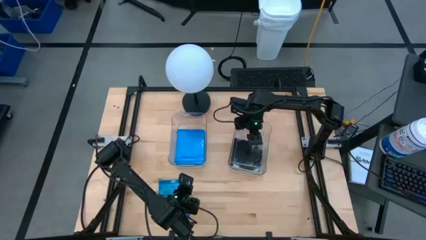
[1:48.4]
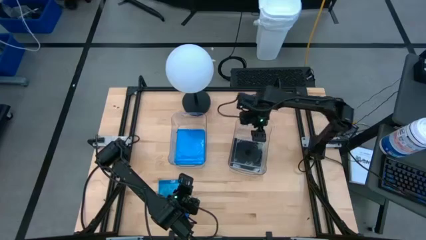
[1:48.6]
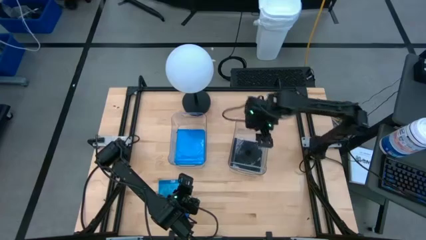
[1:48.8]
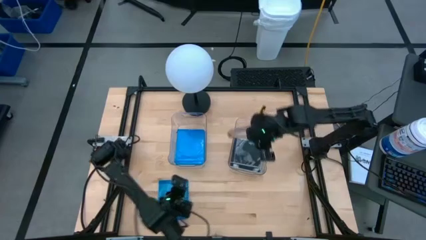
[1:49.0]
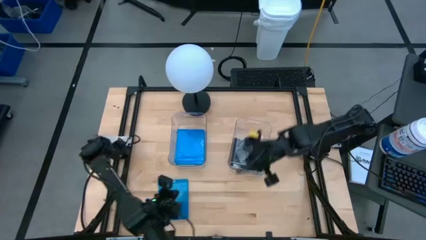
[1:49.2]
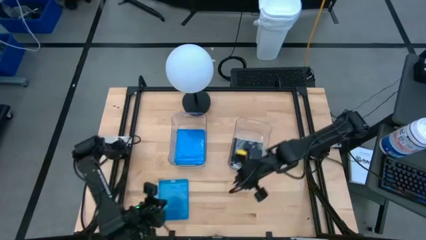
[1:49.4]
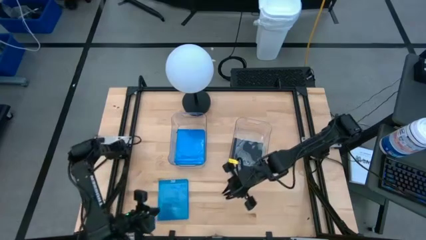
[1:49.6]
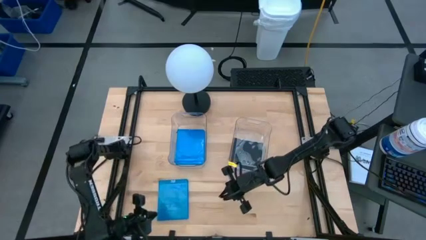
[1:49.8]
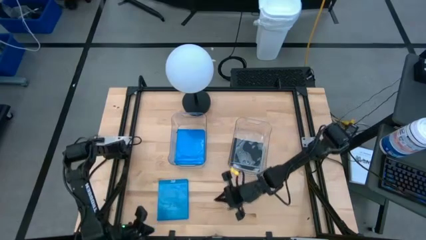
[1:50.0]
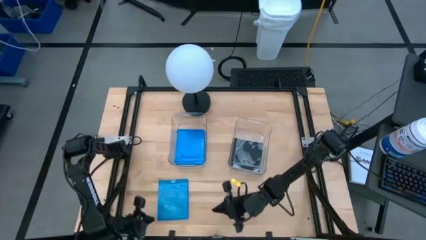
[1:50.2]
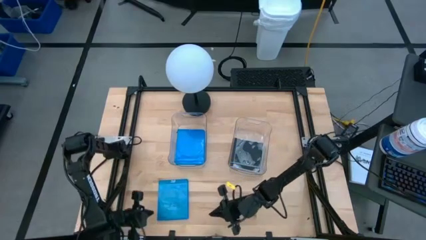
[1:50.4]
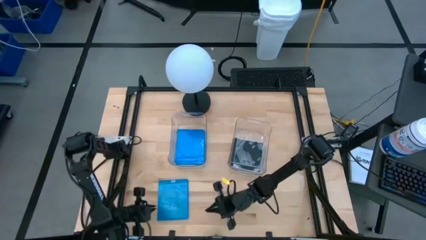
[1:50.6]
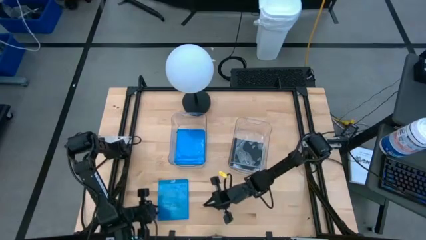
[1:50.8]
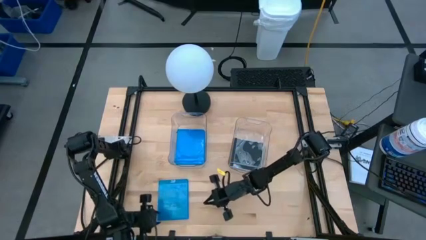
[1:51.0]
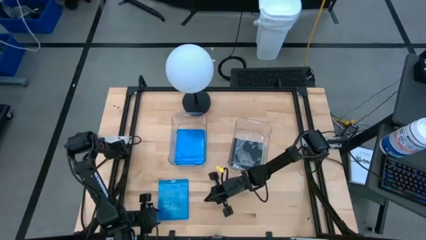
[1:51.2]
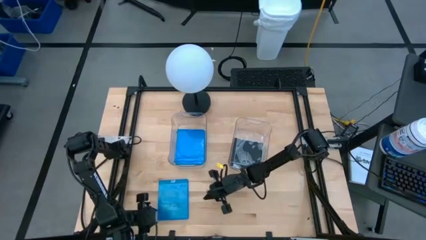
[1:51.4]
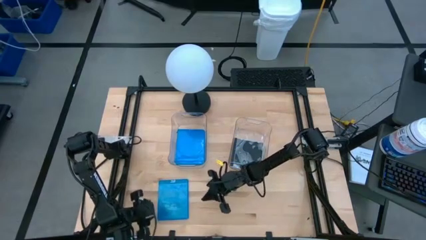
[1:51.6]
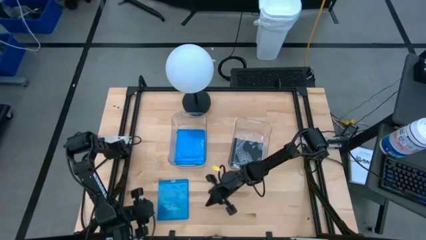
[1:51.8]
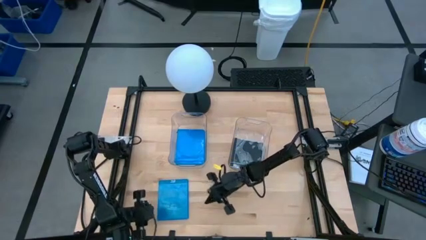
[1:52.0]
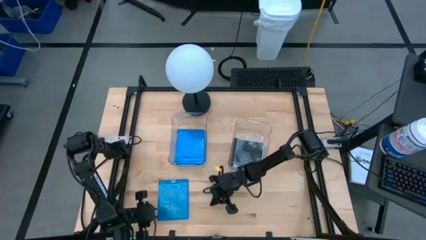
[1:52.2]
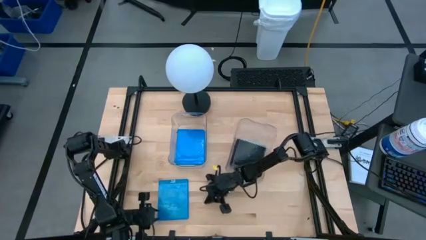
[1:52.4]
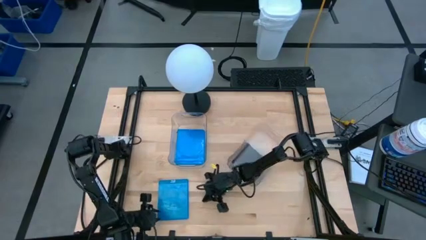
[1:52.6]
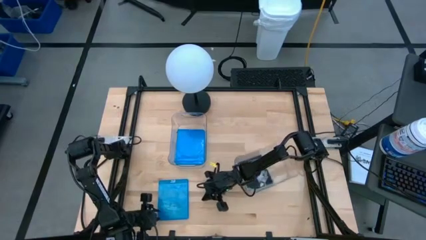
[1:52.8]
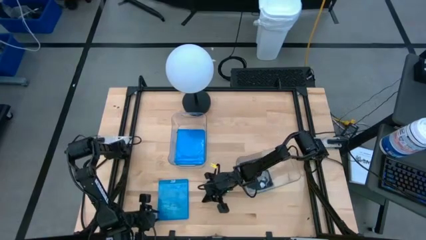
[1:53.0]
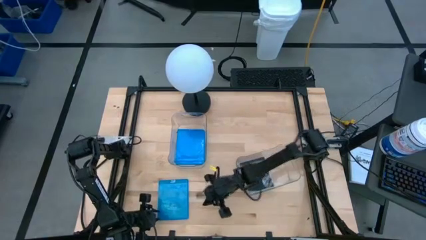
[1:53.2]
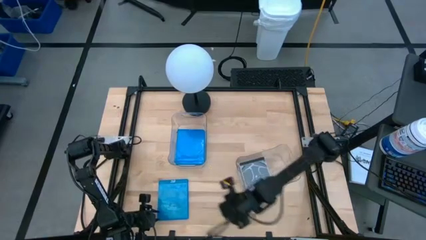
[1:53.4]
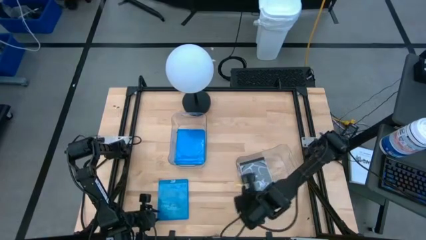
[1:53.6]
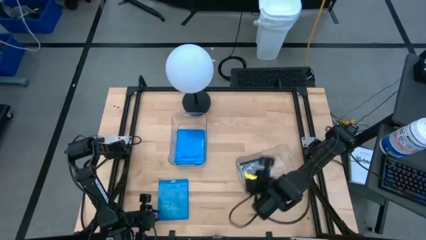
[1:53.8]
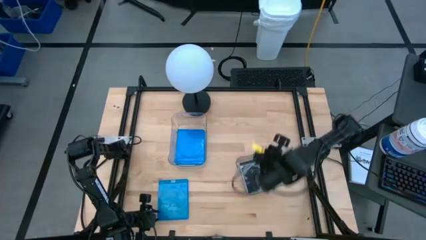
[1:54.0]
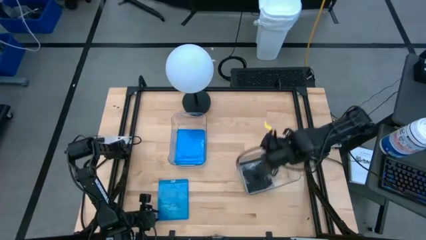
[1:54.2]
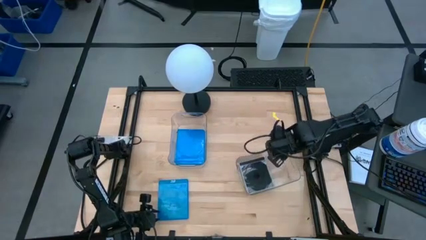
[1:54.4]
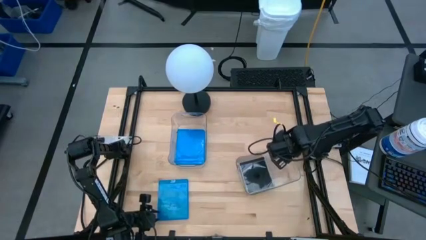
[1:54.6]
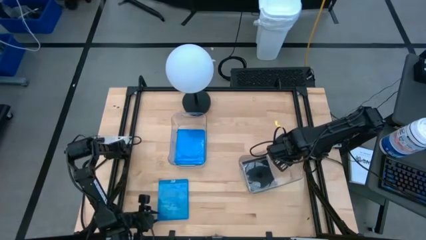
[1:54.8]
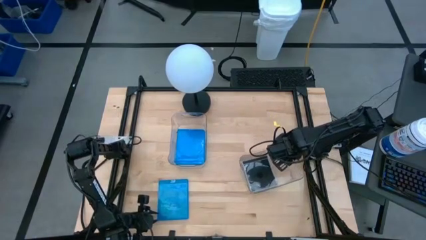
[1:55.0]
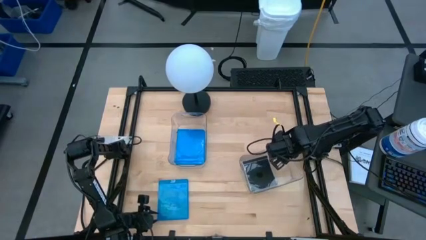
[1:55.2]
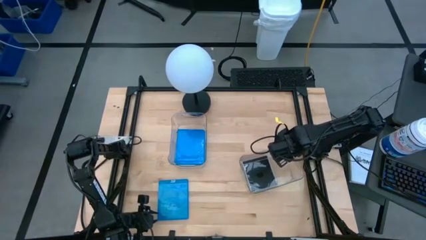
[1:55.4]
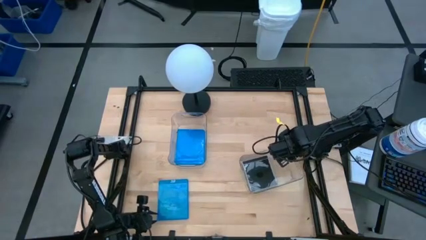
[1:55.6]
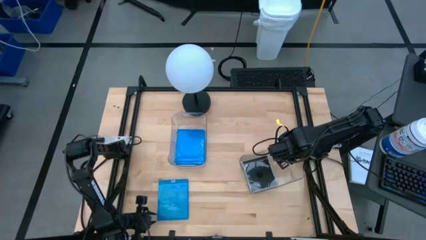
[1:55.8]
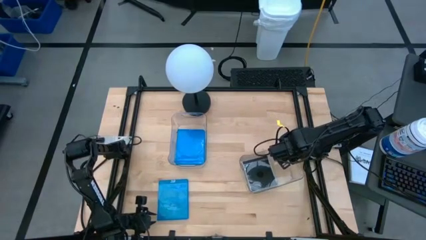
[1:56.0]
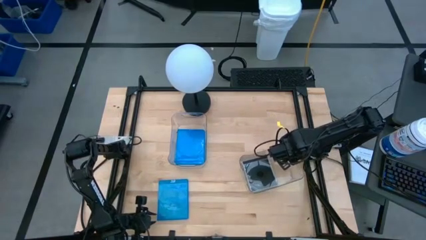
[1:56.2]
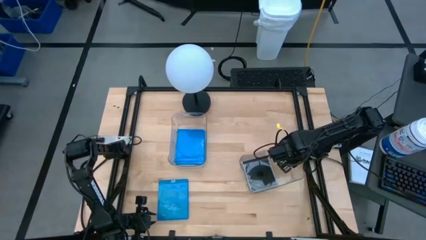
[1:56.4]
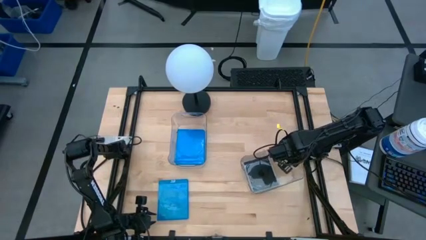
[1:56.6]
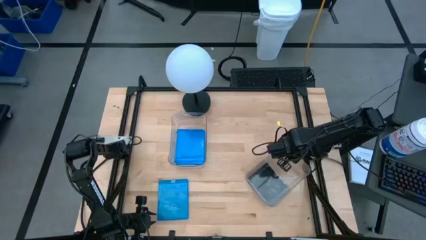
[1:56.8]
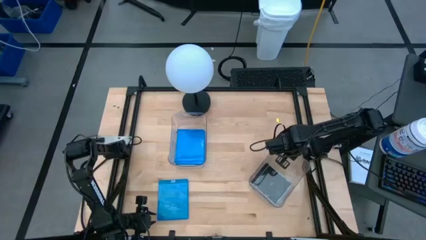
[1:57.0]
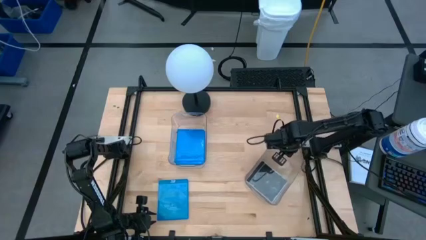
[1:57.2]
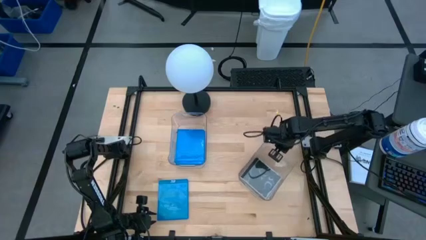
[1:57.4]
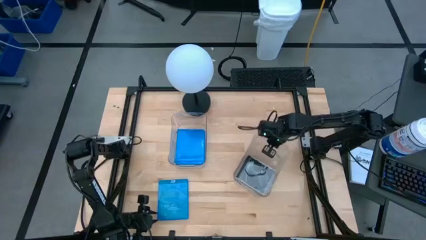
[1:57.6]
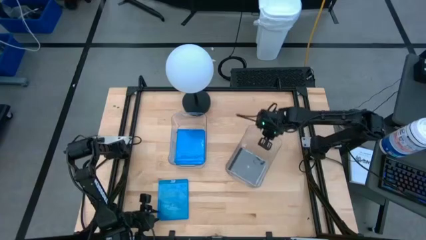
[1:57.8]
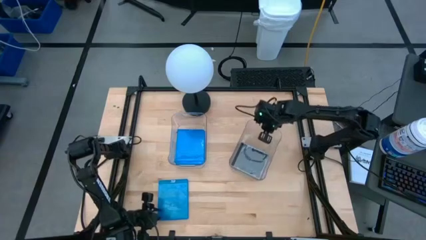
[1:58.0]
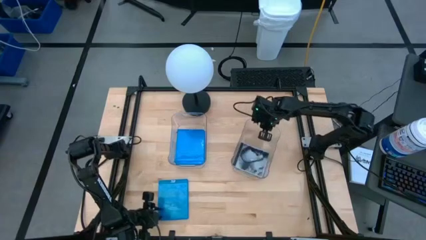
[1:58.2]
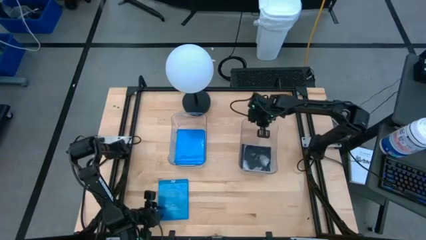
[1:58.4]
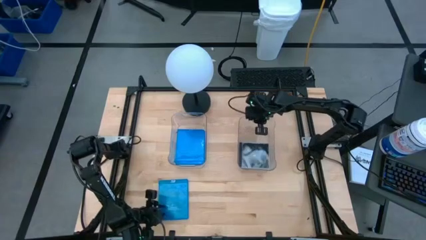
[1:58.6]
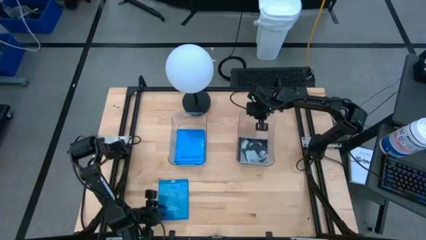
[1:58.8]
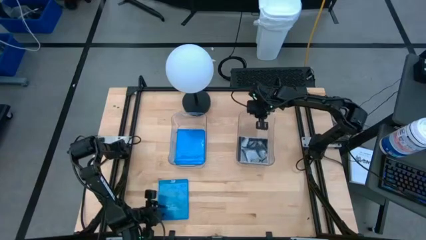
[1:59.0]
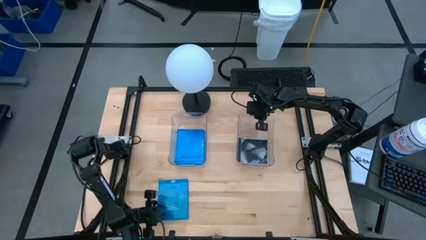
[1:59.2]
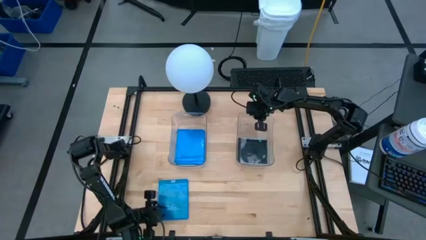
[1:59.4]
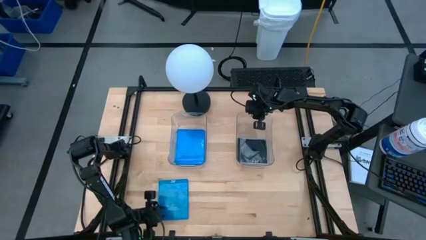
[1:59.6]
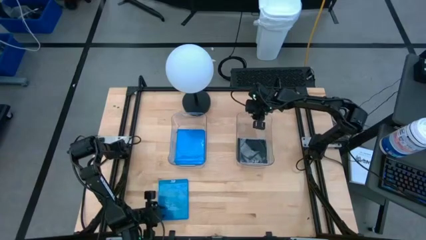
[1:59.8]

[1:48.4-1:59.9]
Task: Pick & place jewel cases by type
Adjust the right transparent bin
